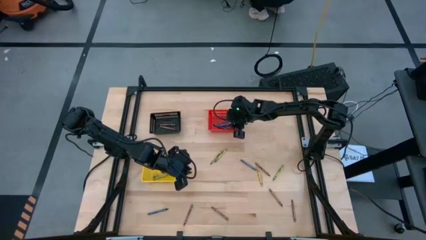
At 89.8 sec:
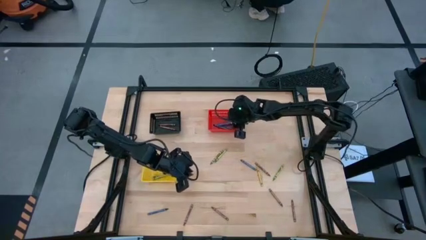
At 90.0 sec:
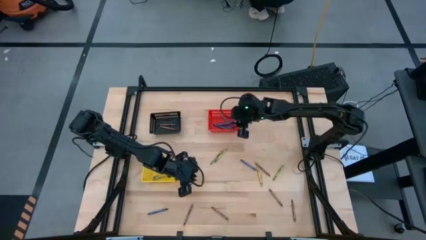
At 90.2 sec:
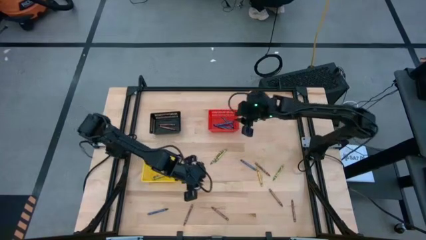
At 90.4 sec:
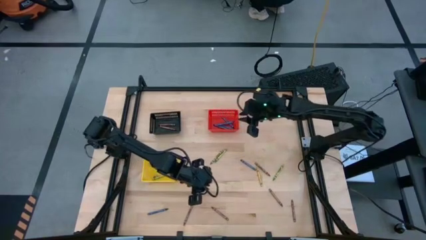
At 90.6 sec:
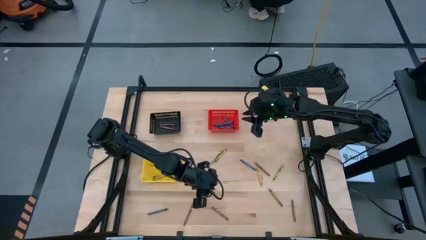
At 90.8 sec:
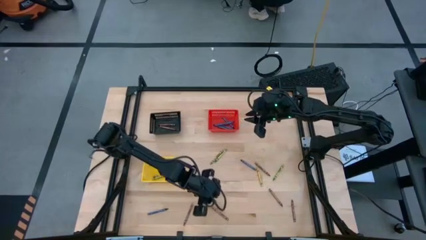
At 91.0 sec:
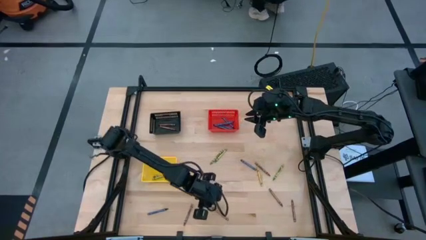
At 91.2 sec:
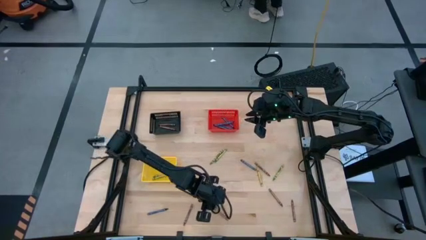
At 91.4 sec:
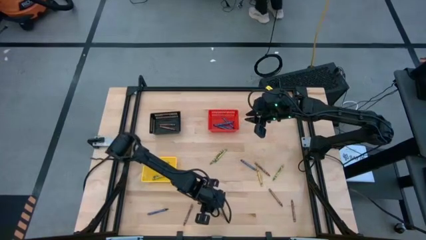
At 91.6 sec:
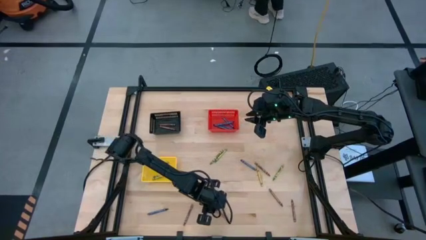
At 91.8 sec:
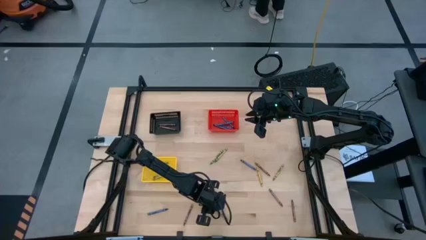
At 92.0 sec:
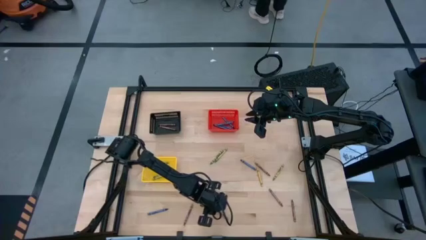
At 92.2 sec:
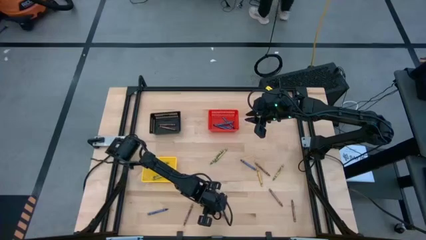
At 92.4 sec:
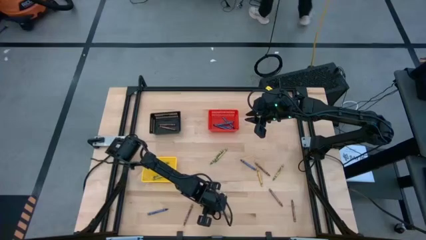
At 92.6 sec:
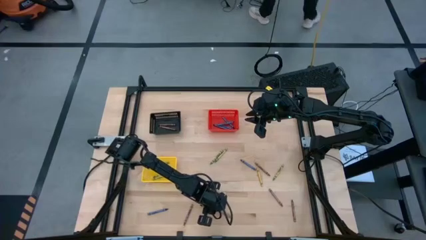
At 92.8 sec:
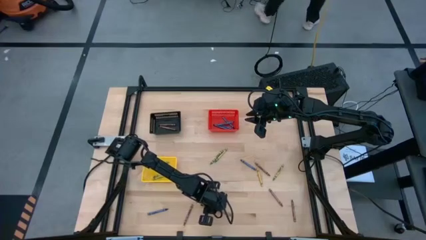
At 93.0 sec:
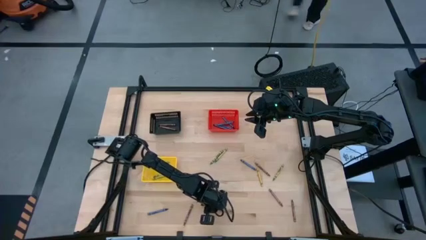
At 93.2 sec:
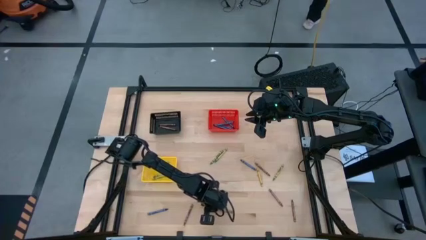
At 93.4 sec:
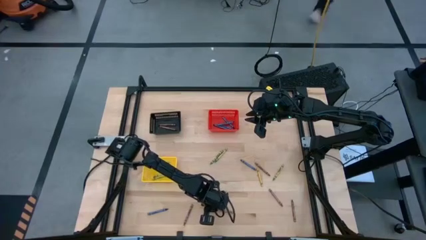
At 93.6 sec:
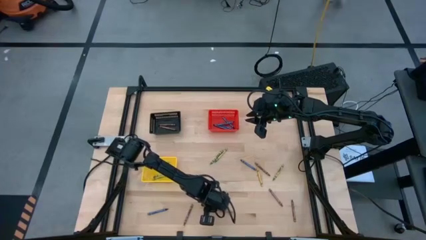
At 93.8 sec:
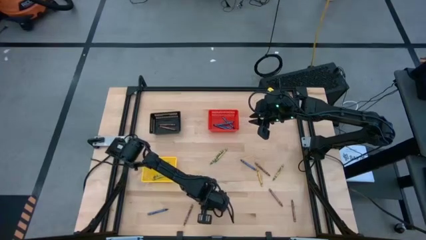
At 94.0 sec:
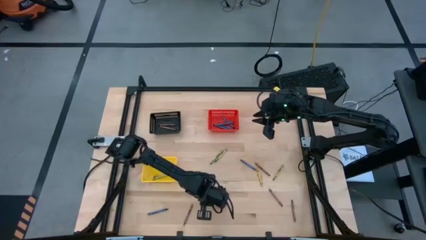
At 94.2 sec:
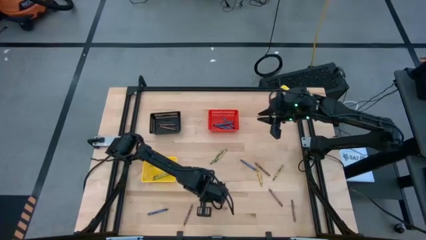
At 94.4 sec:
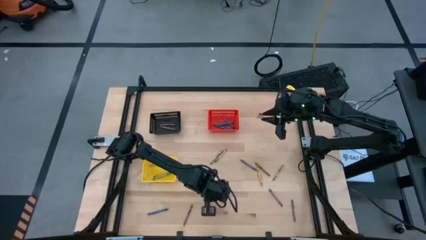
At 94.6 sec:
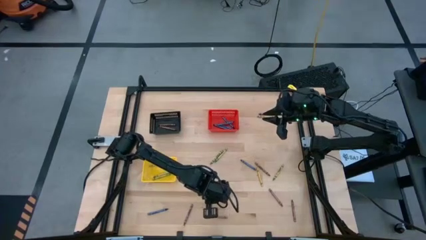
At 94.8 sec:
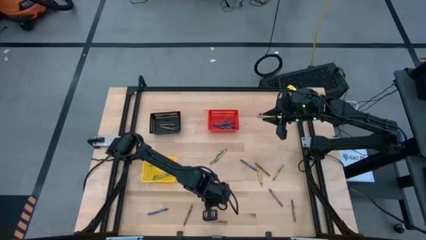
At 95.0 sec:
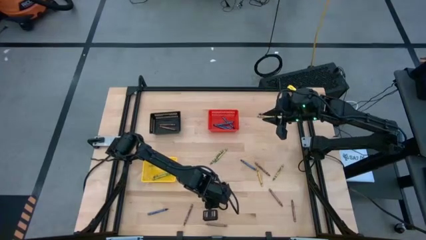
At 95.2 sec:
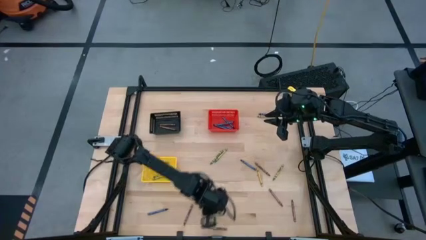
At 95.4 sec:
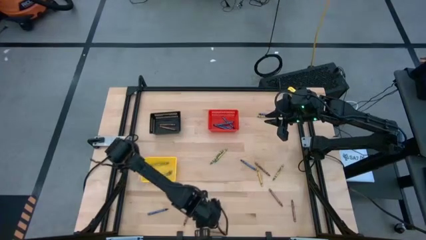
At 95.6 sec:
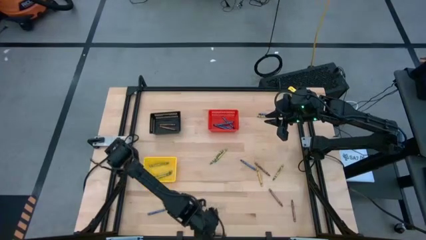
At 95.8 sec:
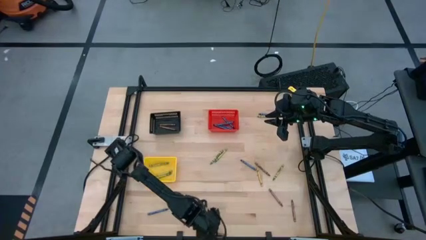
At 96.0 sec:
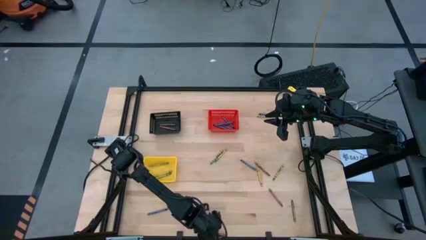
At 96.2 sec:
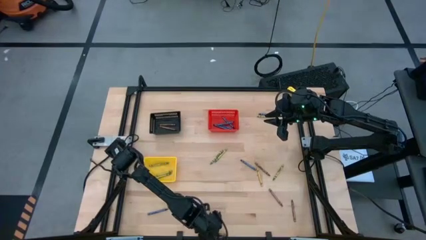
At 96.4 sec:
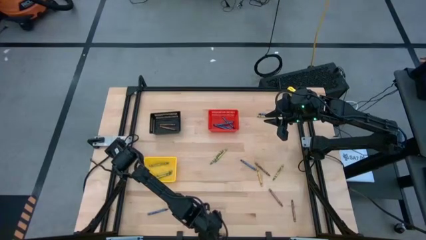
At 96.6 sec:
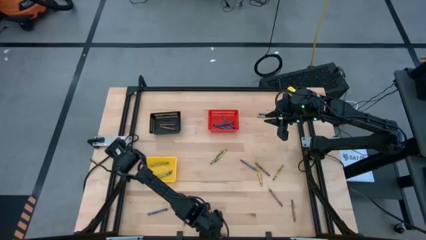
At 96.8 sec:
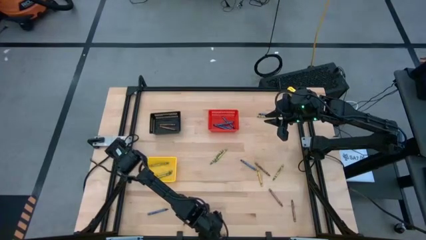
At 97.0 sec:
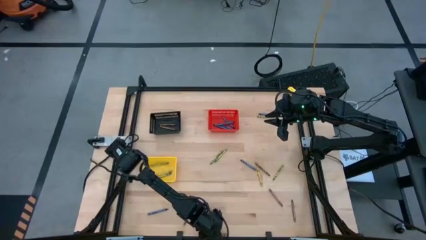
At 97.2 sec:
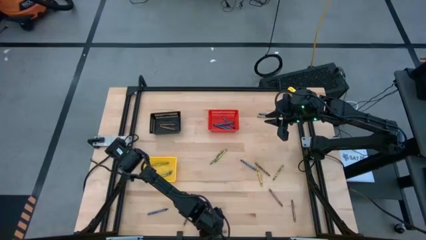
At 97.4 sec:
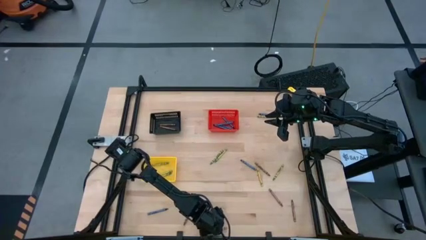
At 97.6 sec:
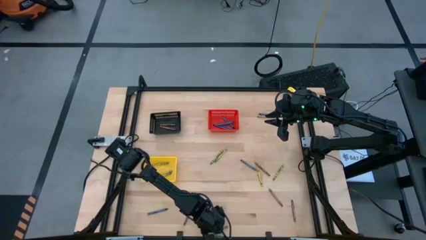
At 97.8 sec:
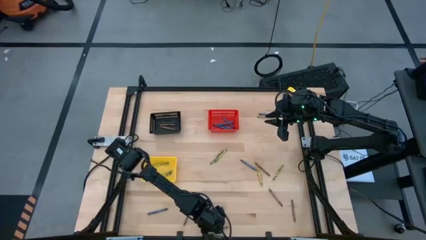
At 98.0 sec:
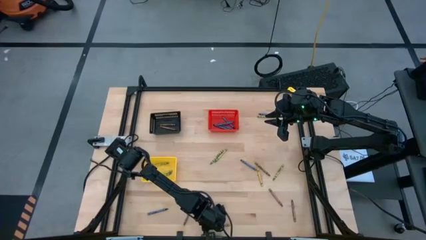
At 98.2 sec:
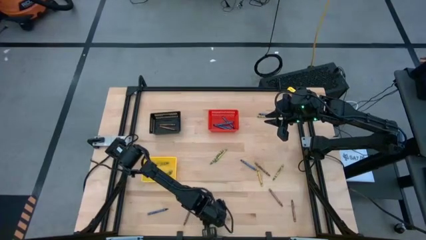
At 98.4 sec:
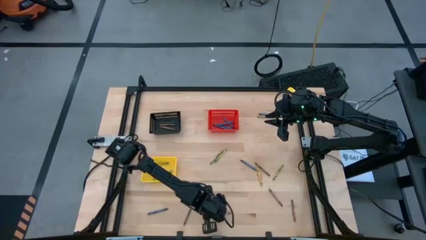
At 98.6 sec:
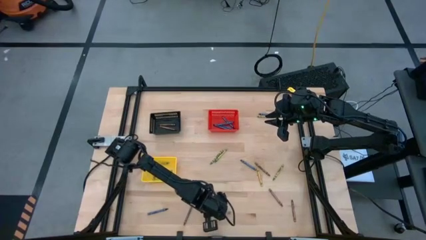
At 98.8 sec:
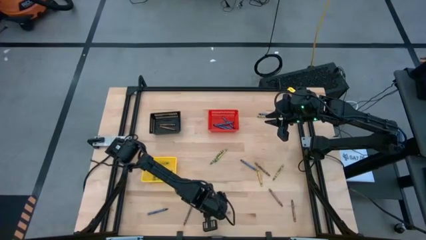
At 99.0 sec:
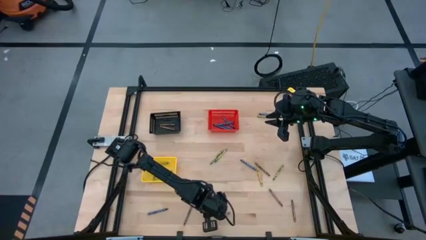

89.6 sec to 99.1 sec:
Task: Sort crayons
Put the brown crayon into the black bin

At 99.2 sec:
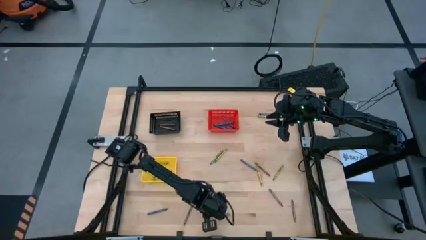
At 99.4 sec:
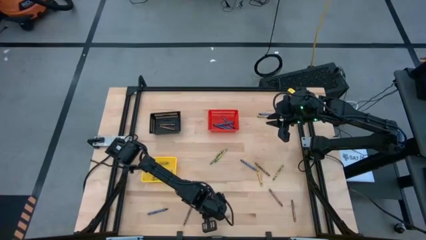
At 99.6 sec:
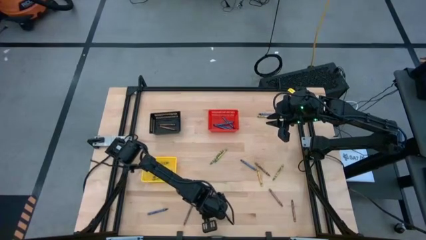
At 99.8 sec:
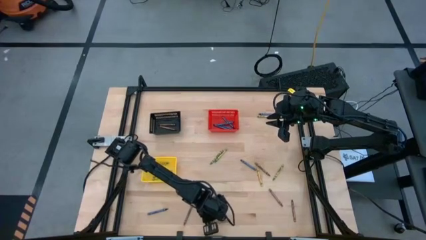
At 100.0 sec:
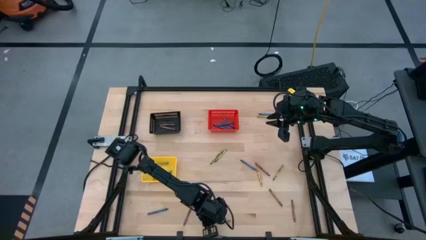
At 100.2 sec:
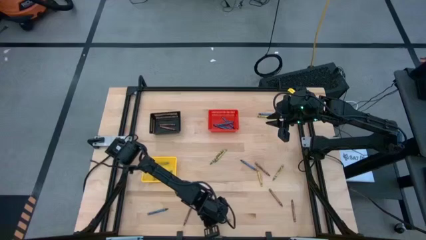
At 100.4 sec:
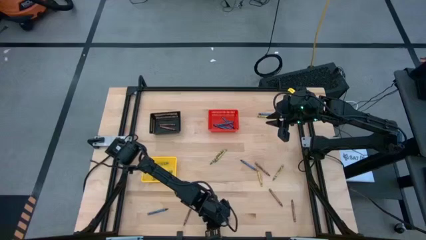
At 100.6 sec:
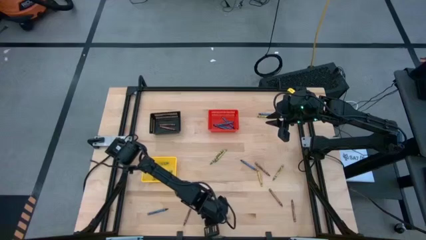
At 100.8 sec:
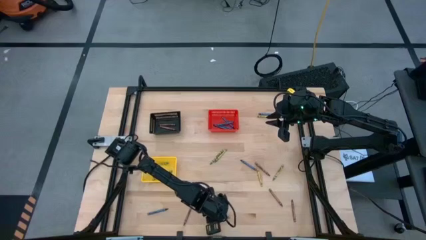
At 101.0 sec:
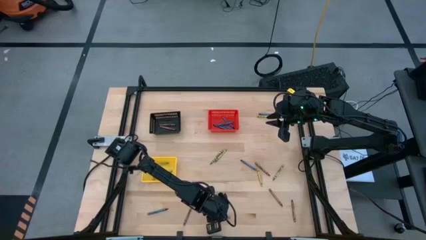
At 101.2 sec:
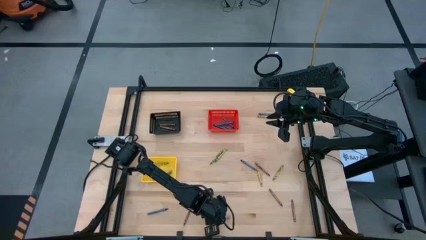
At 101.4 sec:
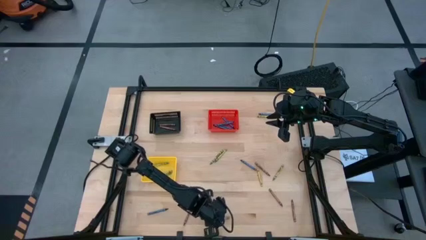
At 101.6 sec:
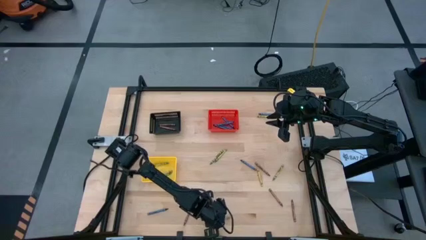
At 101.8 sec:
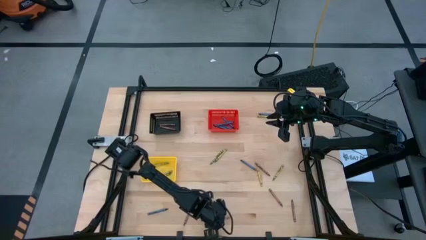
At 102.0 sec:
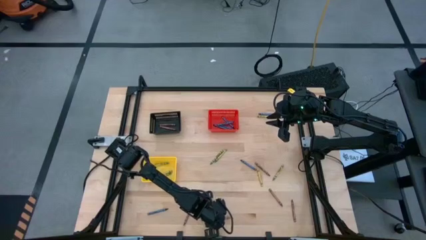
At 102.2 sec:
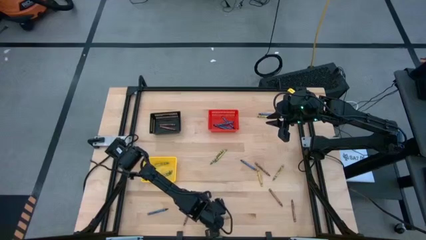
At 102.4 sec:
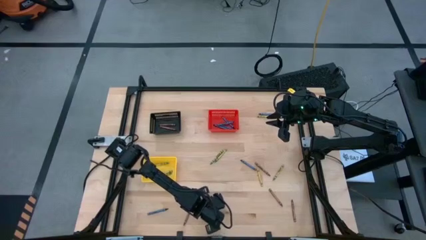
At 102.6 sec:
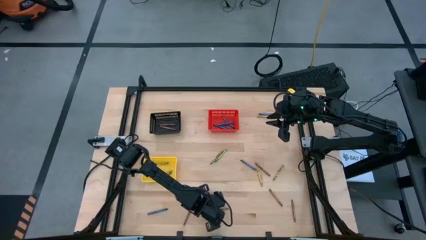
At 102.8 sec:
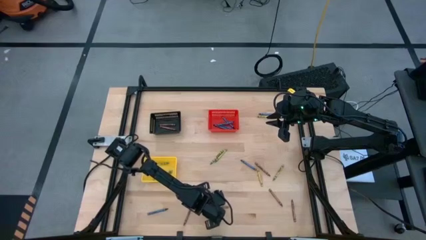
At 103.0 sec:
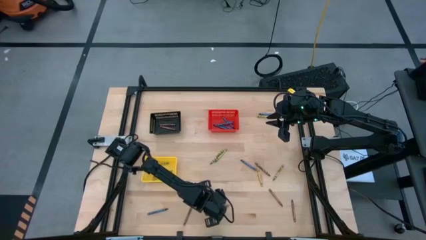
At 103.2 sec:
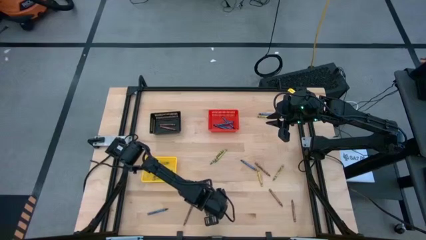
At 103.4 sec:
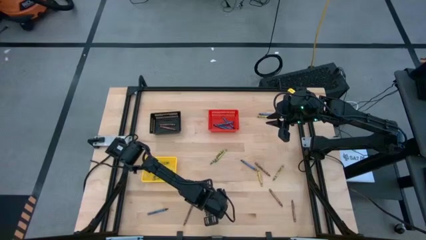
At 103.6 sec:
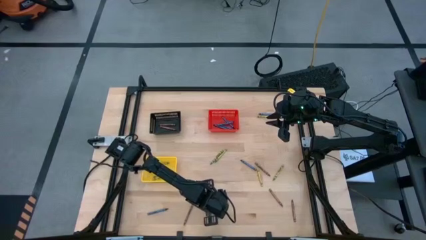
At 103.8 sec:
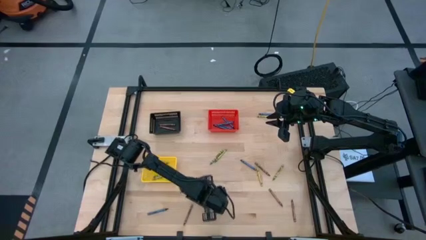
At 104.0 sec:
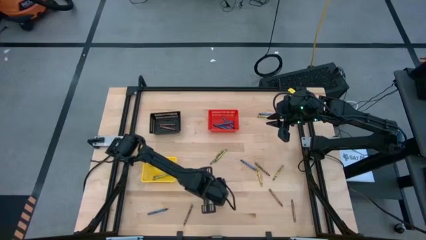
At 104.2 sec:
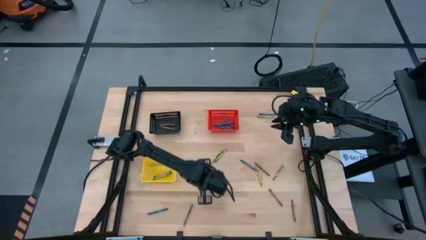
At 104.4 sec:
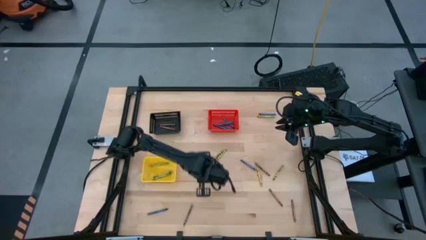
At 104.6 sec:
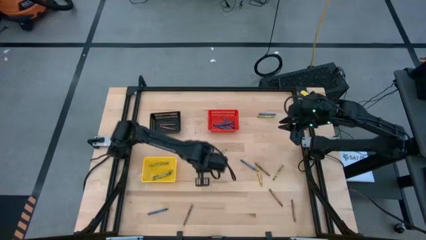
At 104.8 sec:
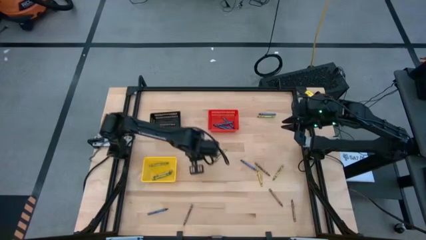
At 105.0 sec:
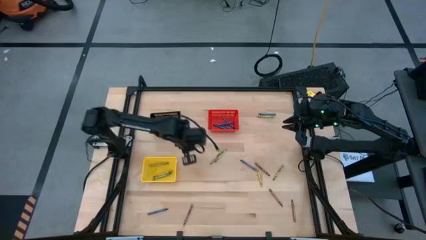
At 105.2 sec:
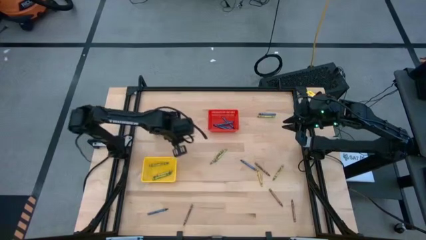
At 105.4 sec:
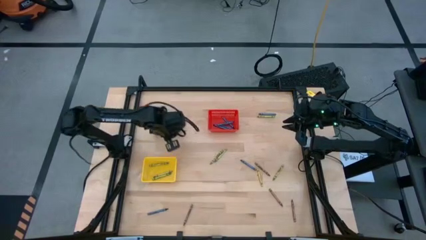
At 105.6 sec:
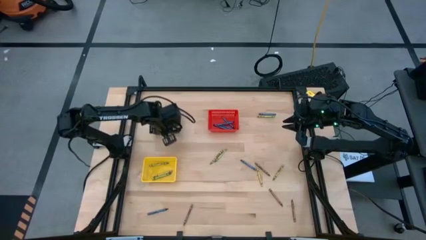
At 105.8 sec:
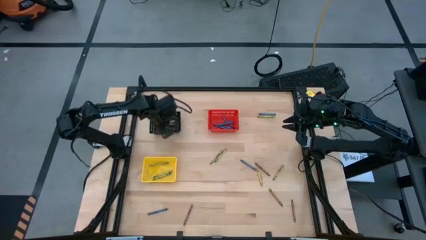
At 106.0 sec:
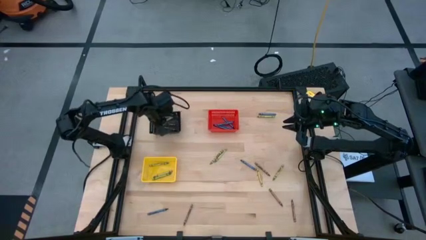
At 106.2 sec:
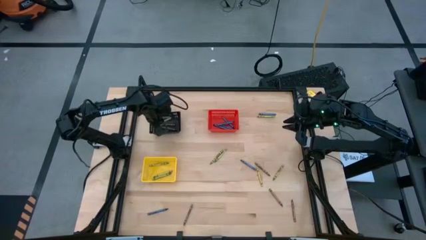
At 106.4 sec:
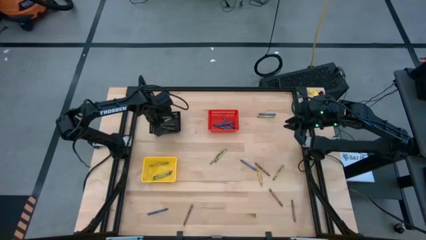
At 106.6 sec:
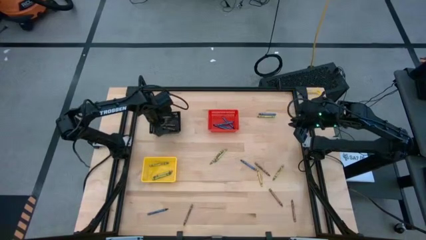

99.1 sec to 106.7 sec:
Put the brown crayon into the black bin
